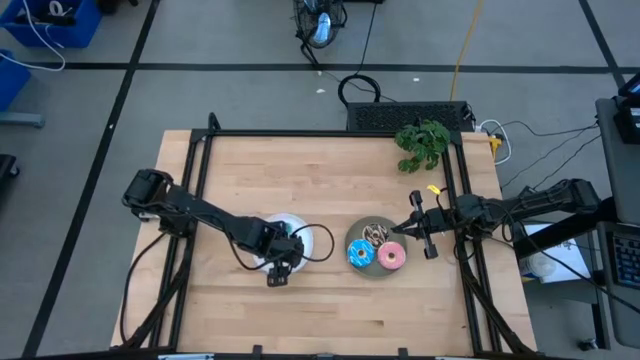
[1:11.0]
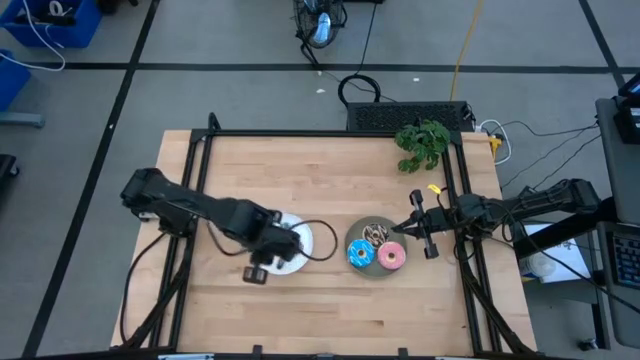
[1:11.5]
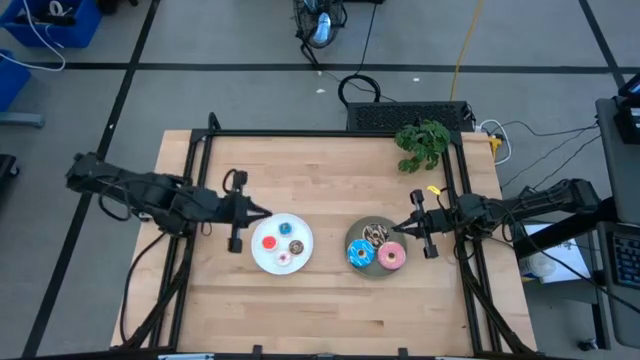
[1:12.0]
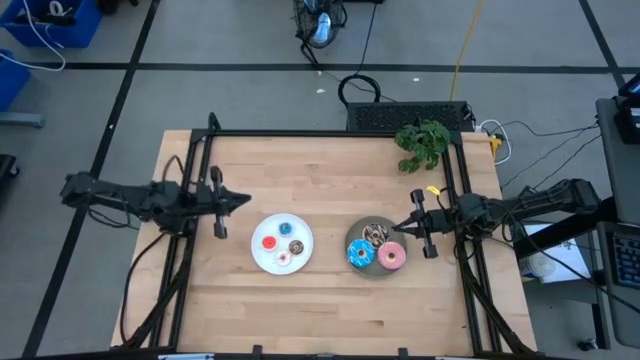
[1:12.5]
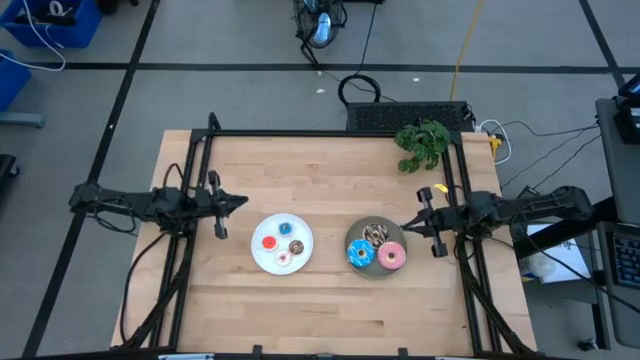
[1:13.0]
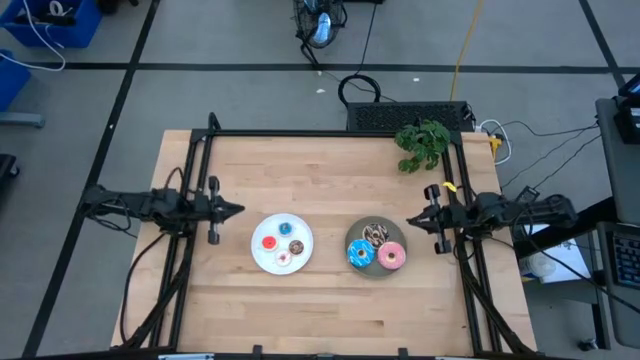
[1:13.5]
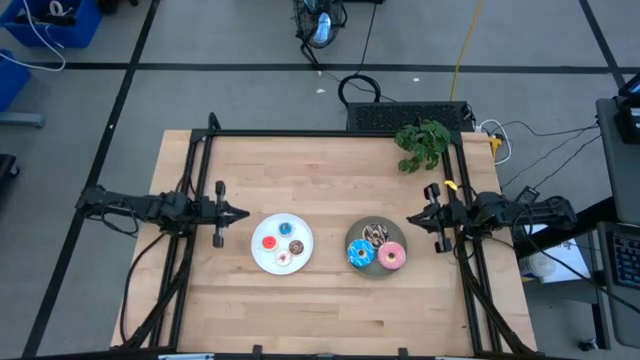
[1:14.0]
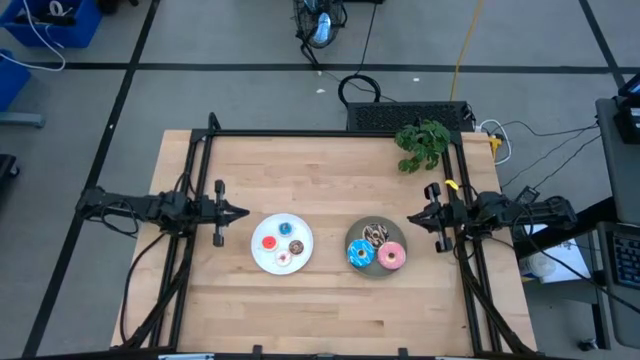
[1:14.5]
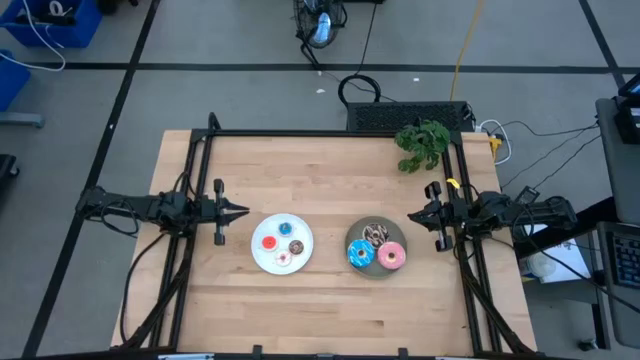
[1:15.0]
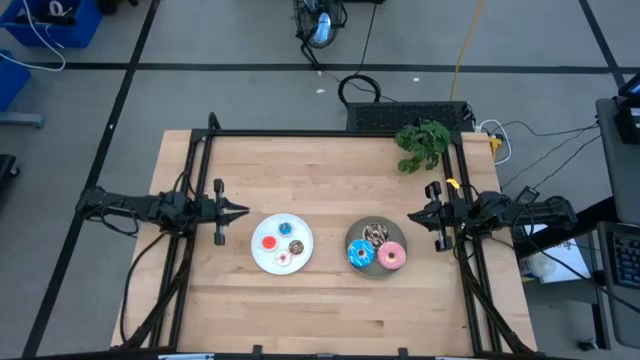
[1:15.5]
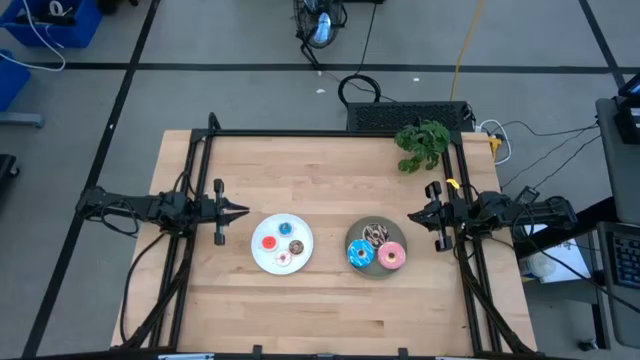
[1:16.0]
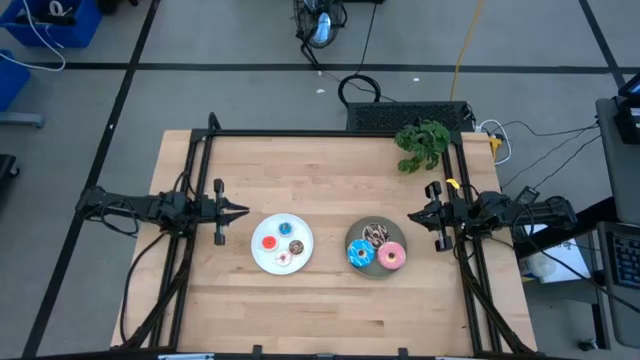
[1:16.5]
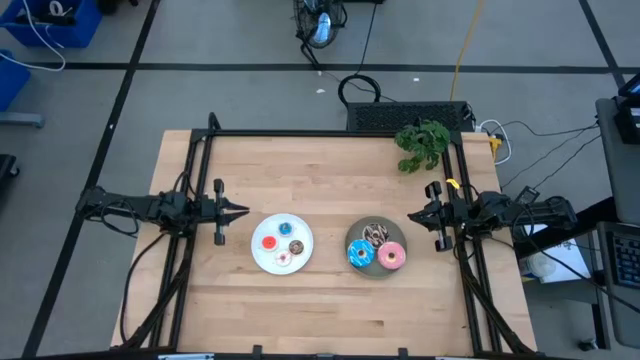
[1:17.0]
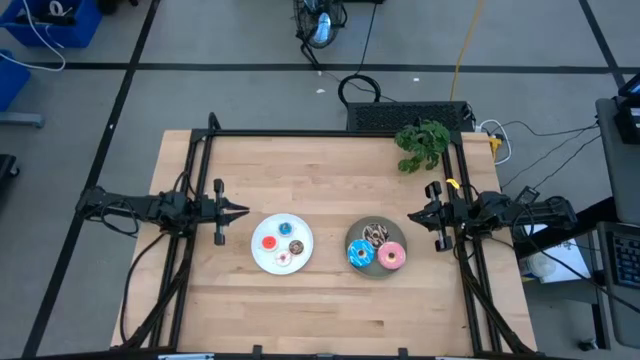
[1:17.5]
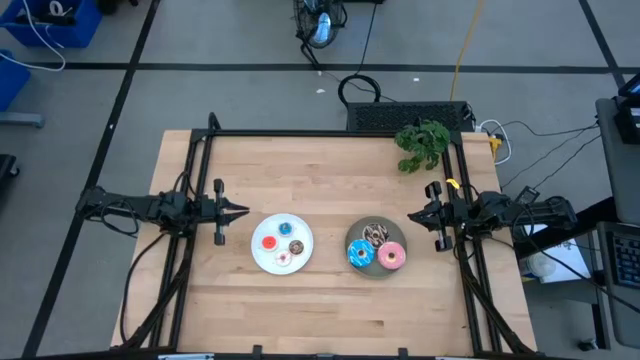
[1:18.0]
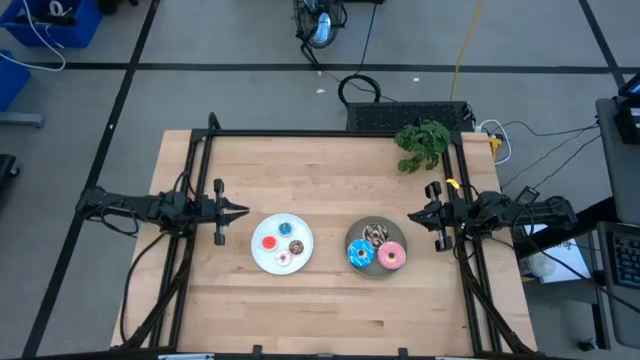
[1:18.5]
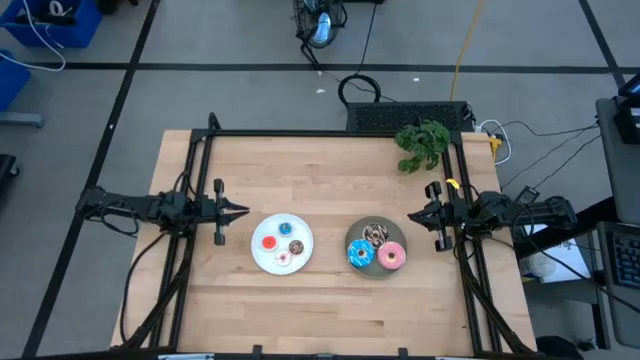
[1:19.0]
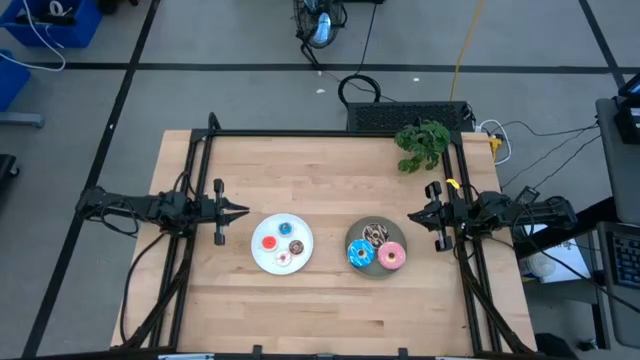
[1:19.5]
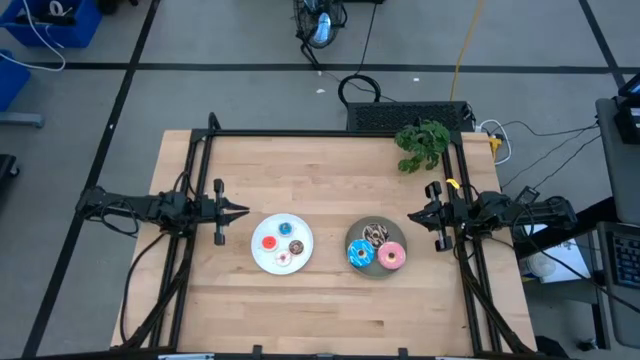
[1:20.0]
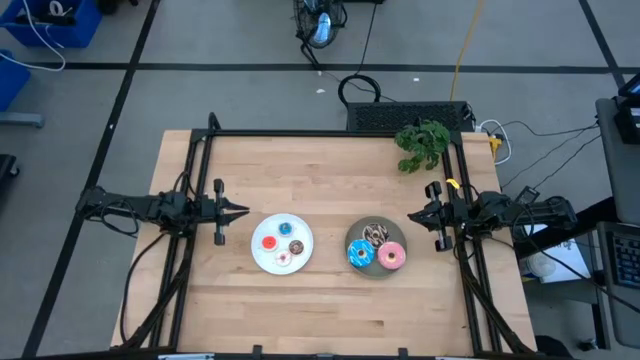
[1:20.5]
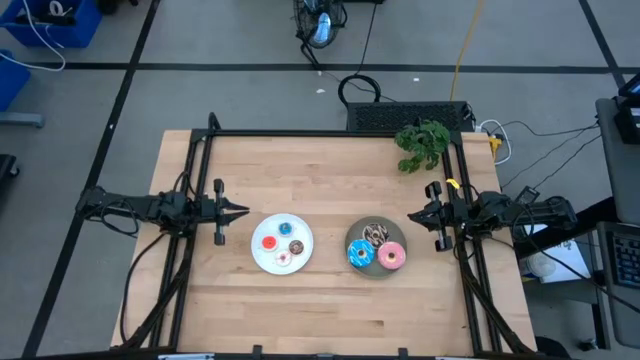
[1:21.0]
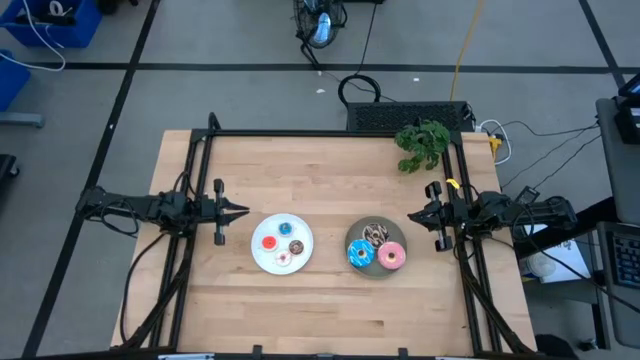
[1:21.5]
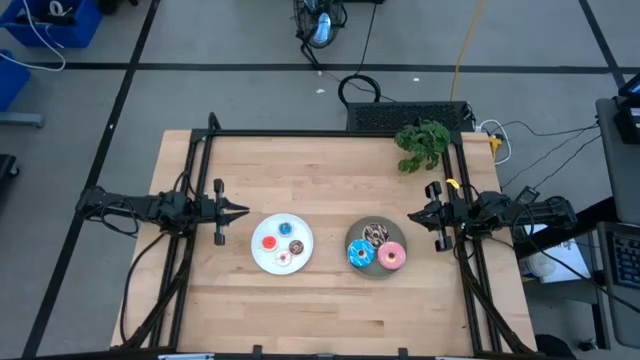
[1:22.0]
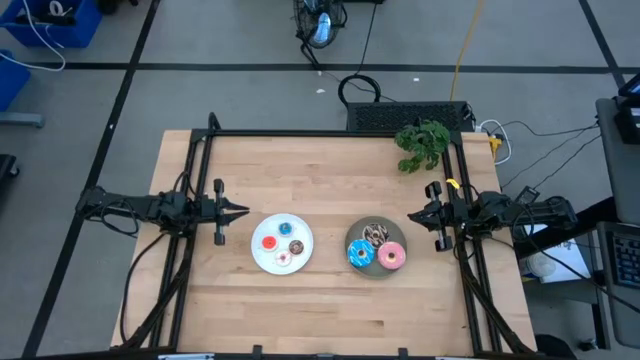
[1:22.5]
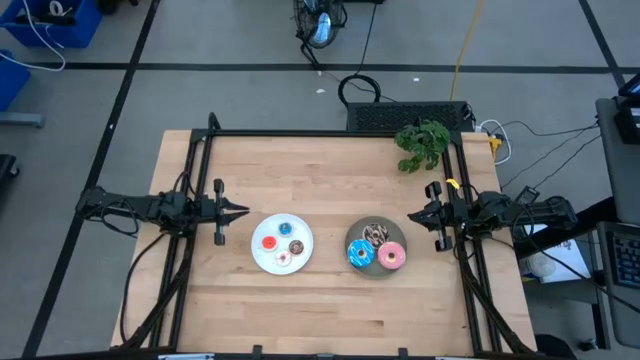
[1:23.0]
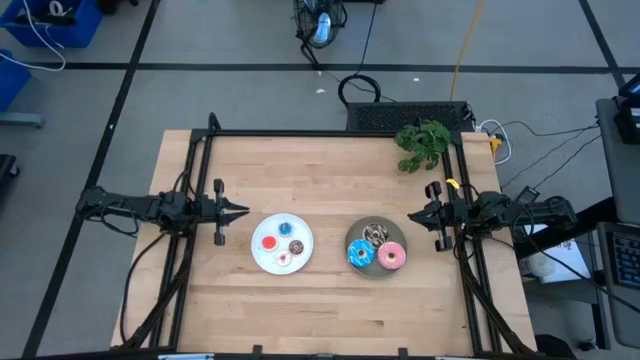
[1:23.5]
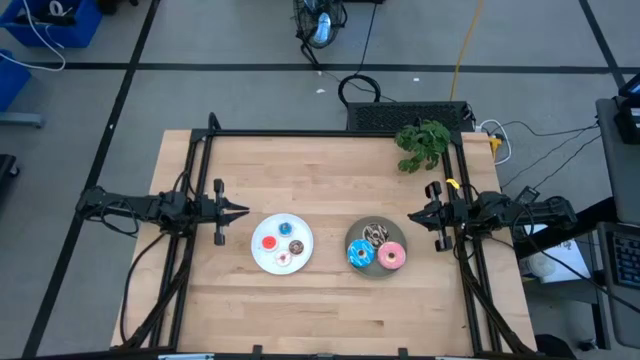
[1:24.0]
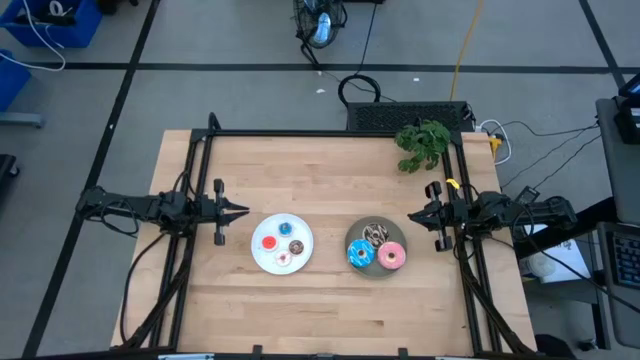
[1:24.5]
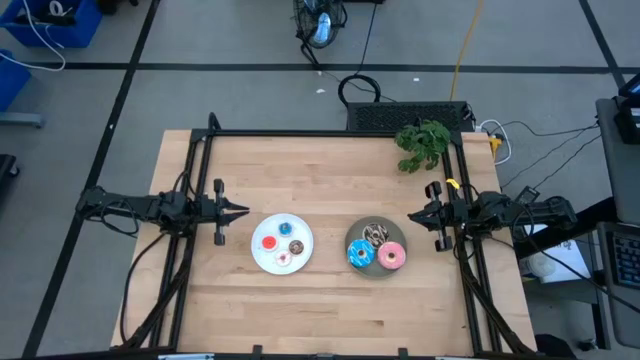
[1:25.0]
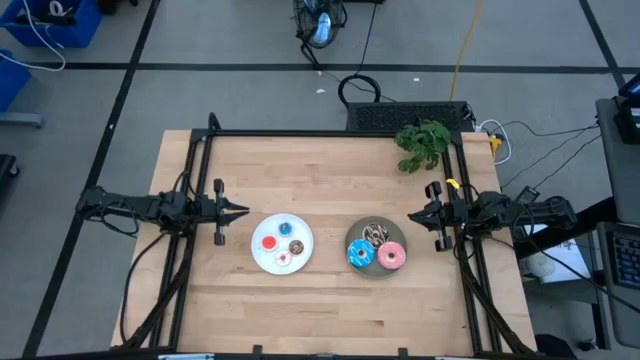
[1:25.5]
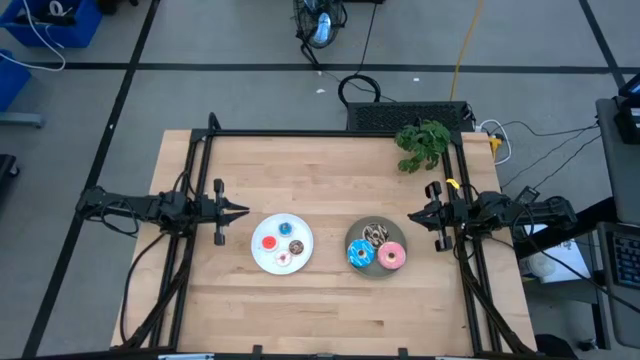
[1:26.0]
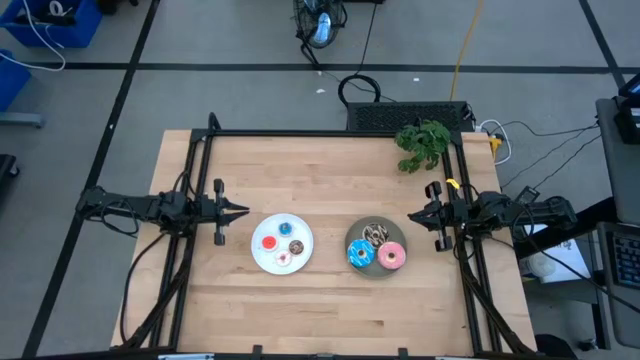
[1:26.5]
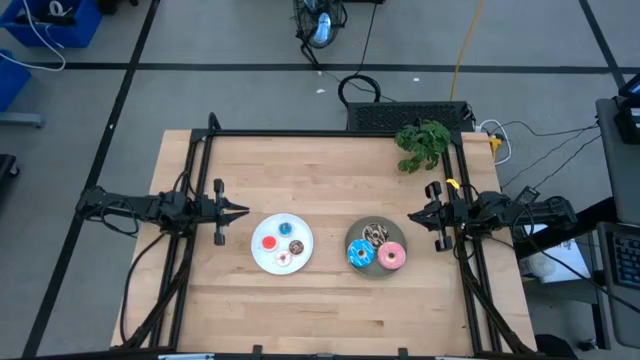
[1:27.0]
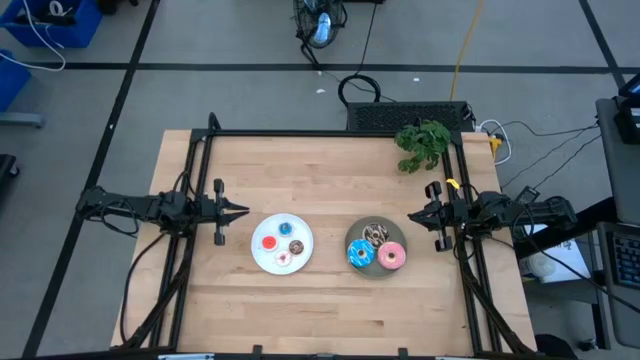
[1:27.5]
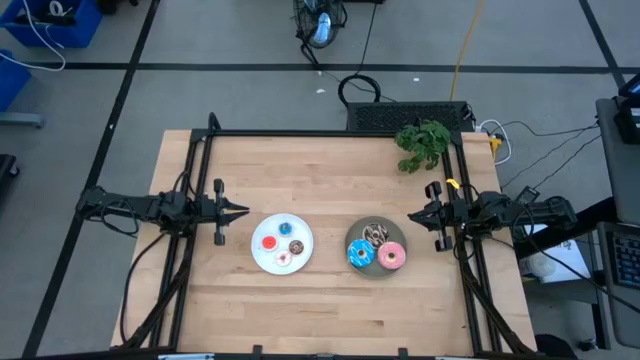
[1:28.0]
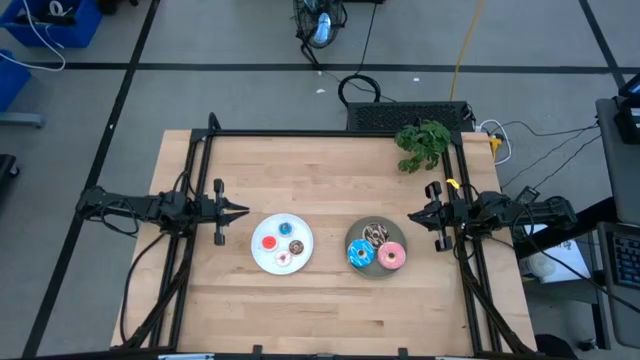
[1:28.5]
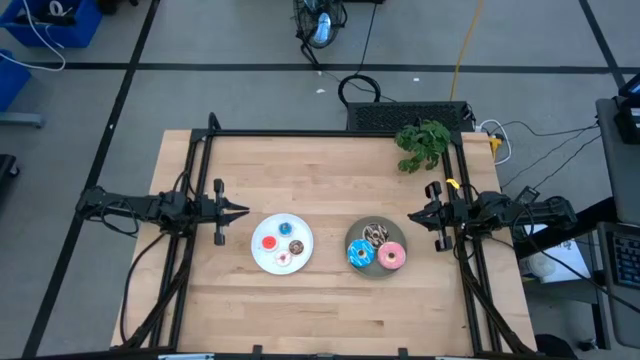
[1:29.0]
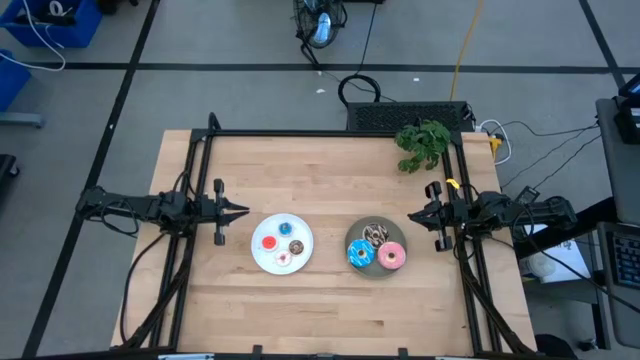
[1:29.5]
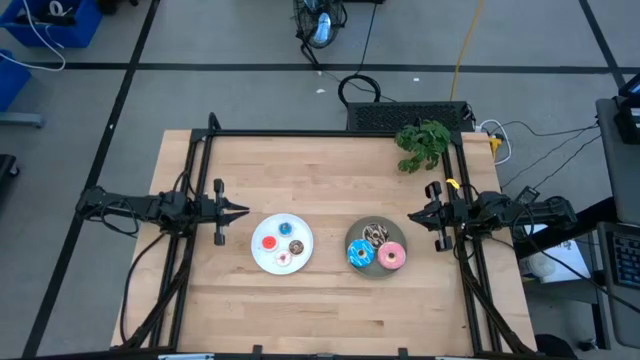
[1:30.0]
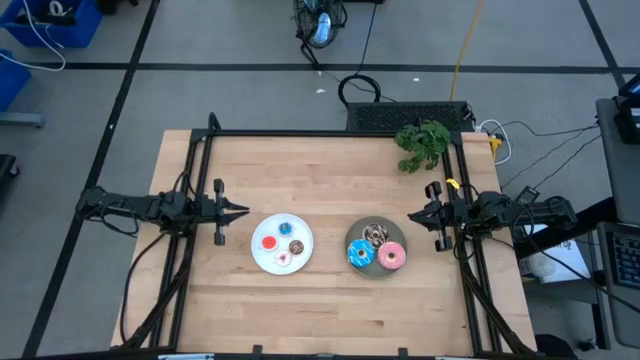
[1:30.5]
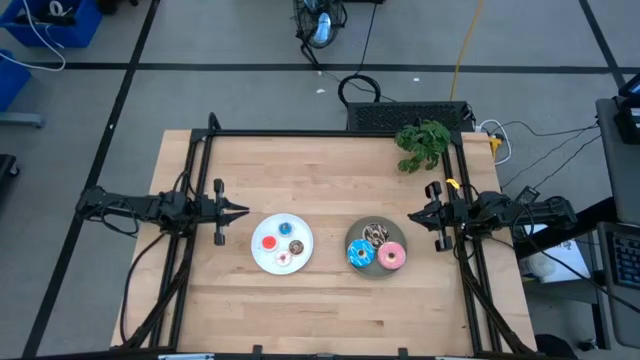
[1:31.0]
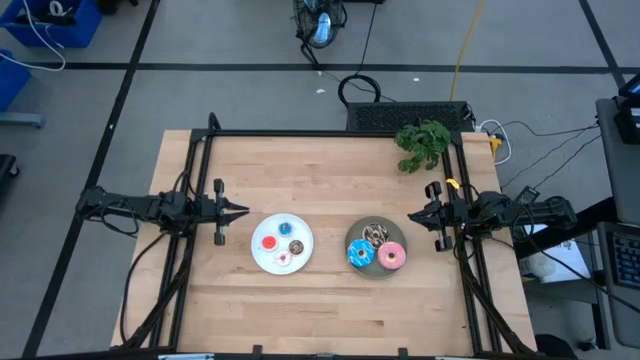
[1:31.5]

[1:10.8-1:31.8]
Task: Pick & Place donuts
Return to Home Position
